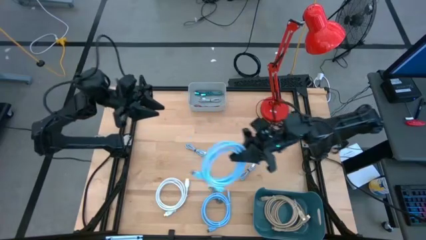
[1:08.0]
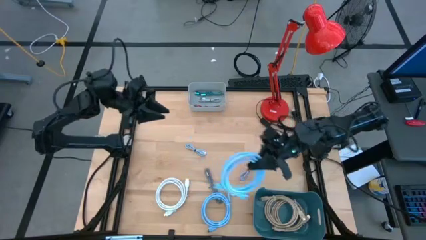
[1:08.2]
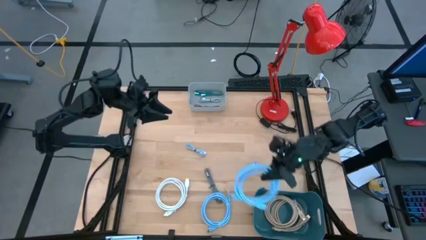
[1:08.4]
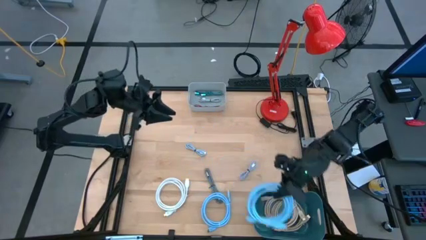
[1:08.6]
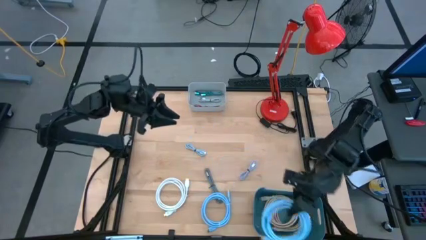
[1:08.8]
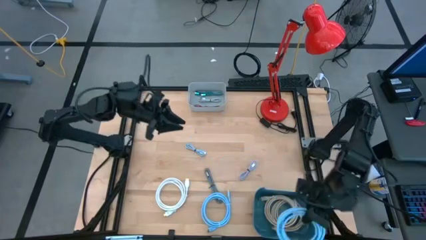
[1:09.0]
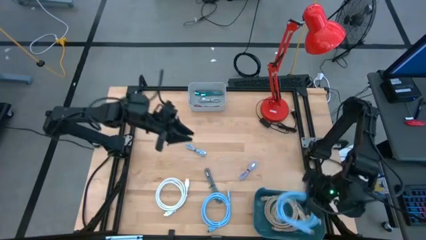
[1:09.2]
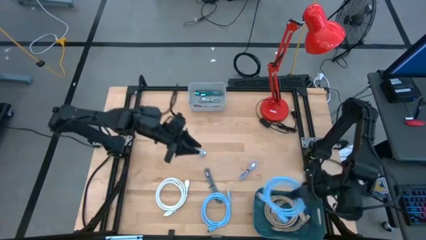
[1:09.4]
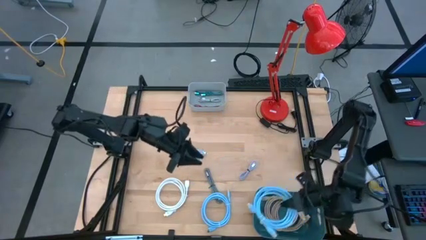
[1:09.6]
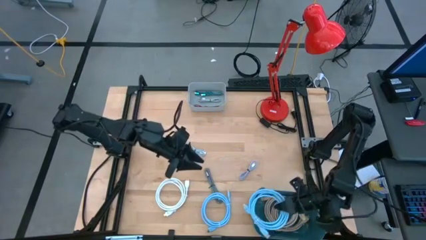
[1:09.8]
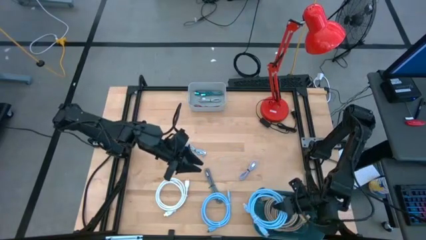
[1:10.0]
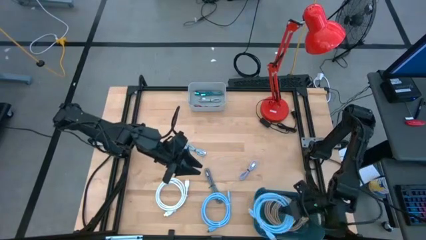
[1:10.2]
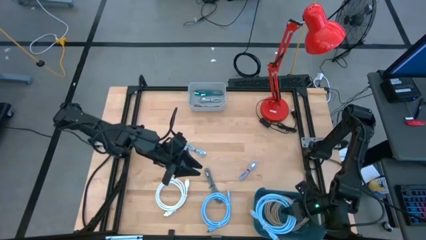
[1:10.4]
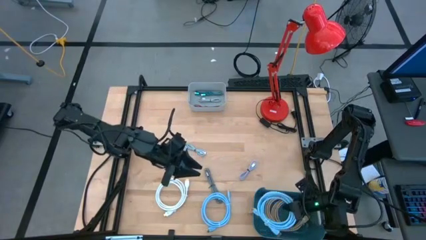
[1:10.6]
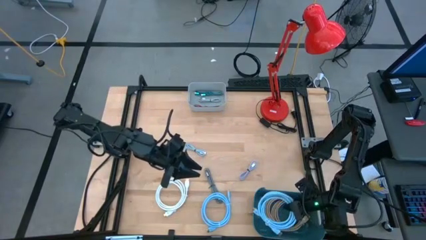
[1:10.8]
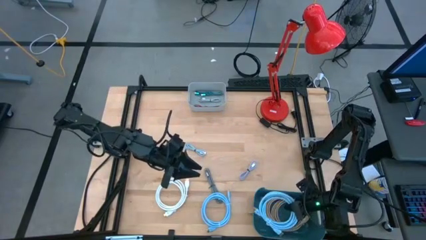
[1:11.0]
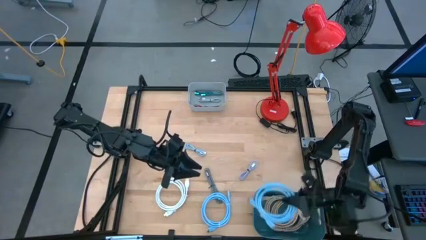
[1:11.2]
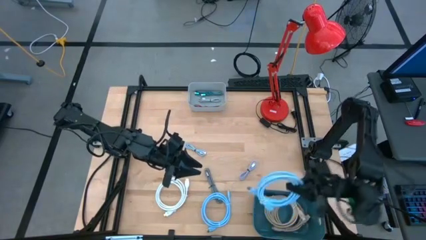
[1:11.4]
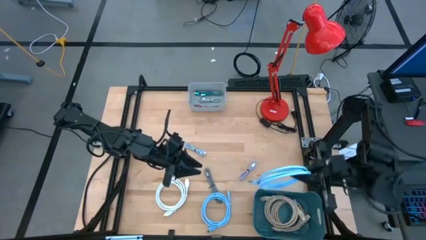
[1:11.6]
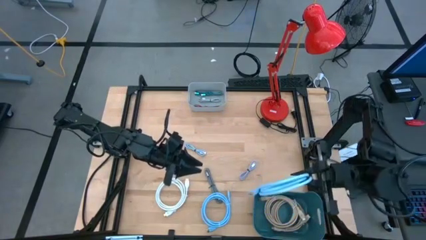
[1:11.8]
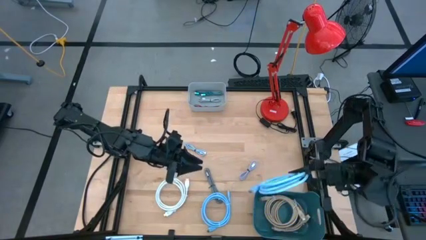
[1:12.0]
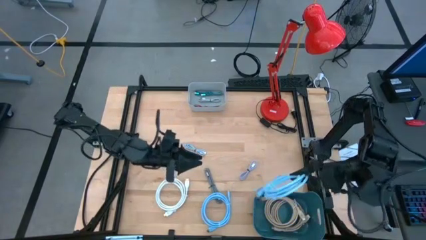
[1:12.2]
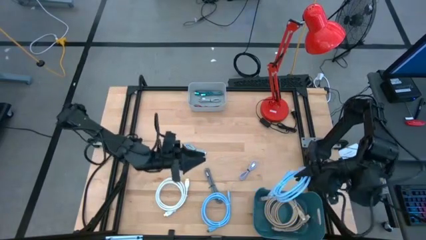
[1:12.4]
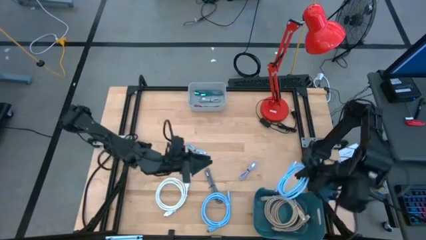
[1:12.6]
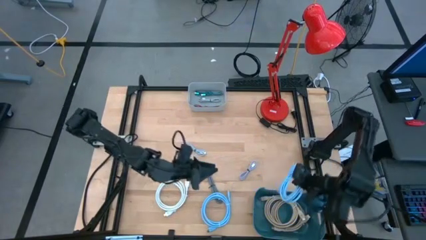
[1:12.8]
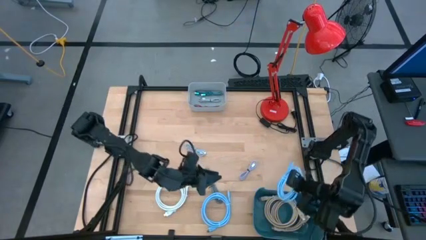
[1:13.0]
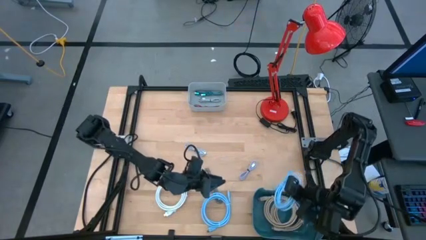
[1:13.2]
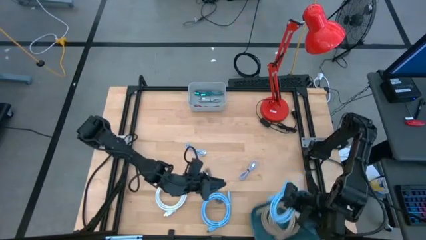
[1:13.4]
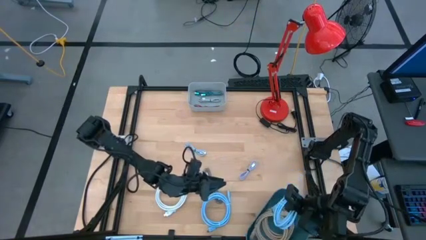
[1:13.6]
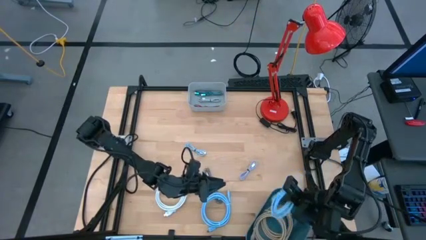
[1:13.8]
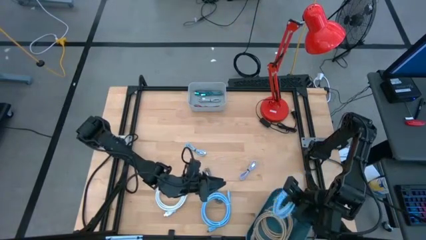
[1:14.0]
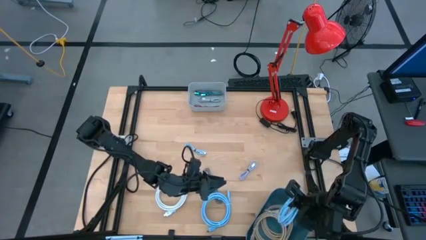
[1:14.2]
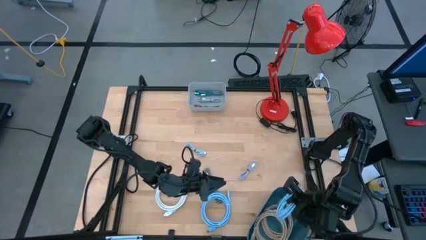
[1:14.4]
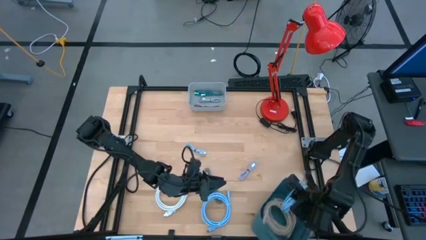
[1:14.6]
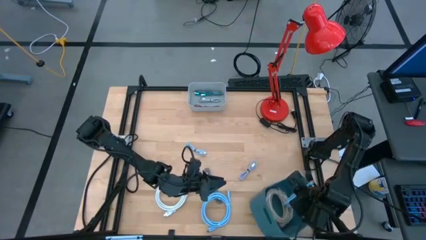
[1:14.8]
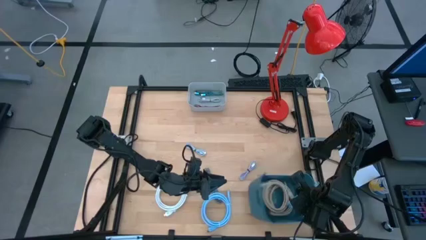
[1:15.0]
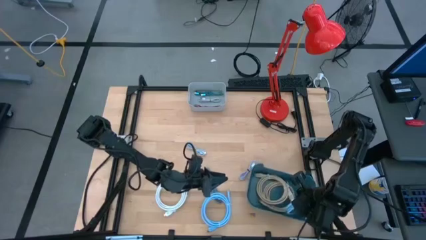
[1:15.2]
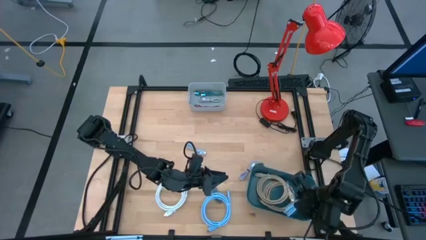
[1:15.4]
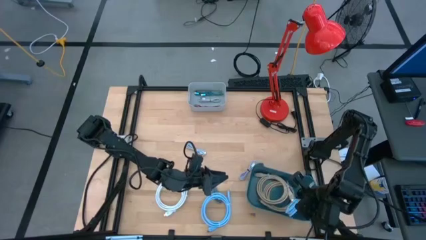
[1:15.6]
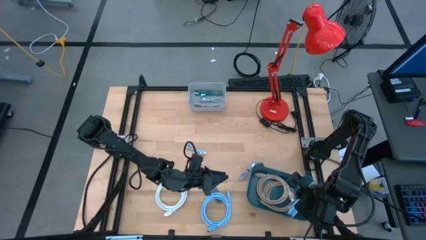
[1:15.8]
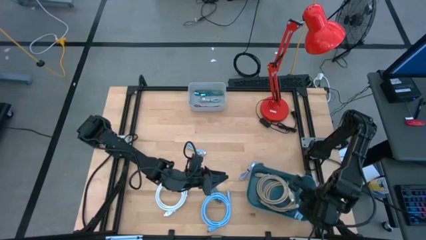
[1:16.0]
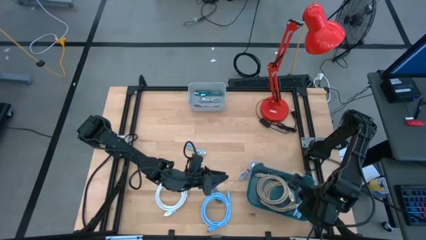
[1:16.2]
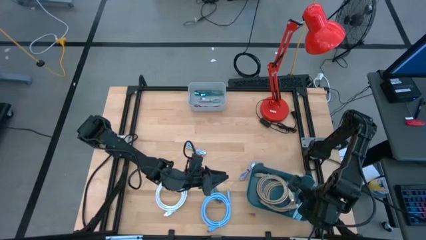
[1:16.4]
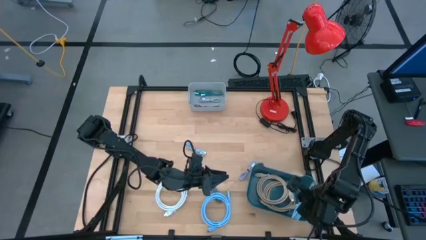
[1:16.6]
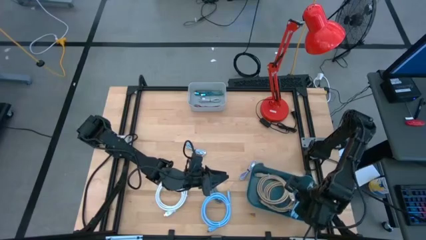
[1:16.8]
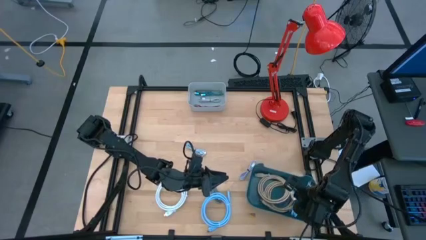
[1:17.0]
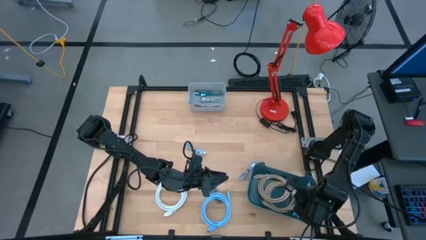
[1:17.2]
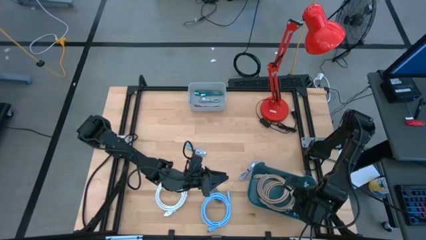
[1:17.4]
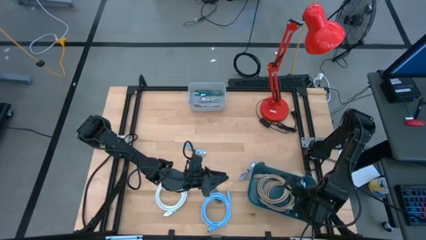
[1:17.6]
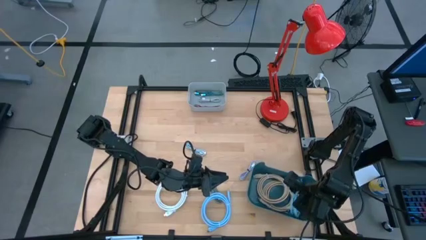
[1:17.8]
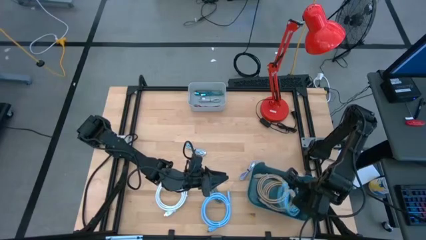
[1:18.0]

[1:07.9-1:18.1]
Task: Pick & Place USB Port
Put the blue hdmi cable into the blue bin

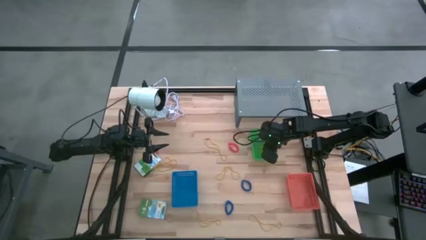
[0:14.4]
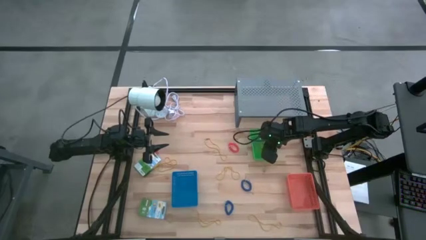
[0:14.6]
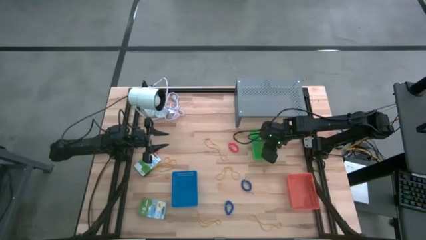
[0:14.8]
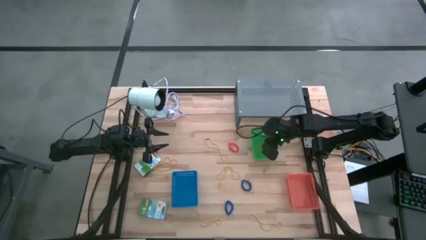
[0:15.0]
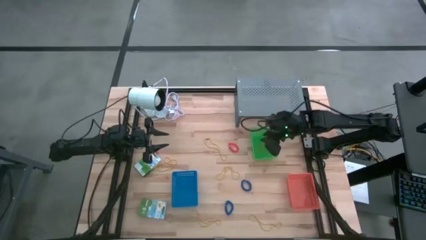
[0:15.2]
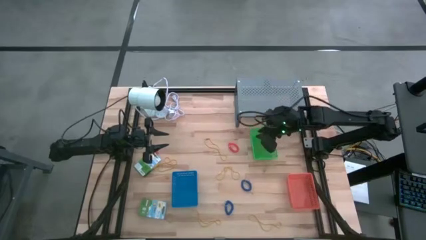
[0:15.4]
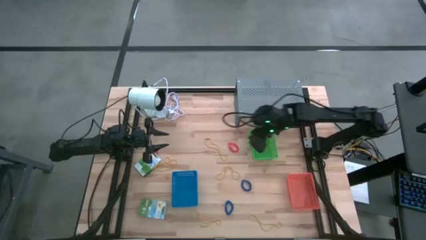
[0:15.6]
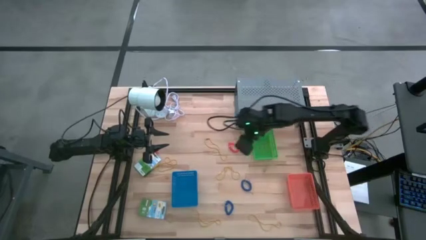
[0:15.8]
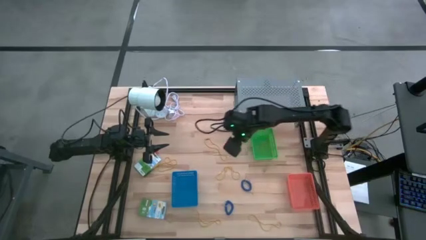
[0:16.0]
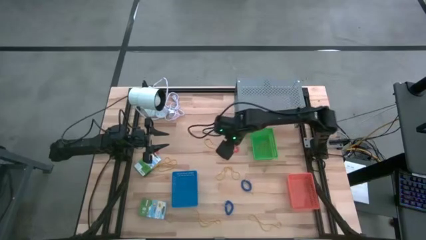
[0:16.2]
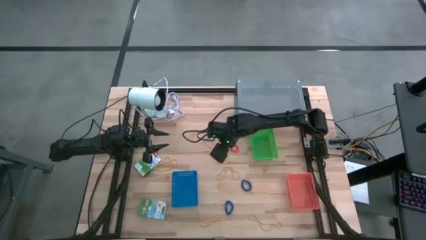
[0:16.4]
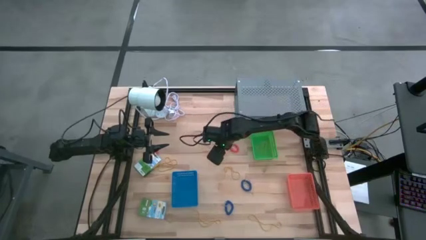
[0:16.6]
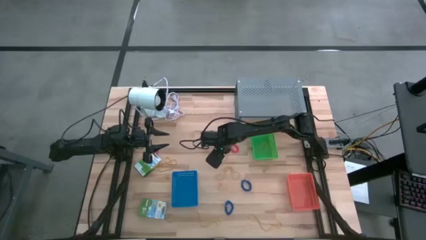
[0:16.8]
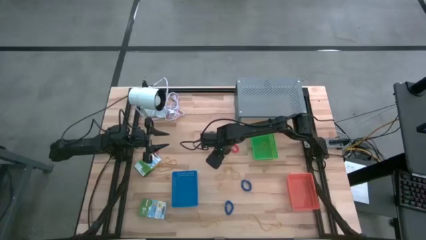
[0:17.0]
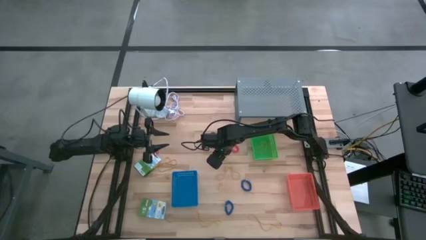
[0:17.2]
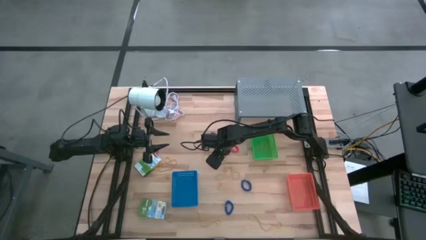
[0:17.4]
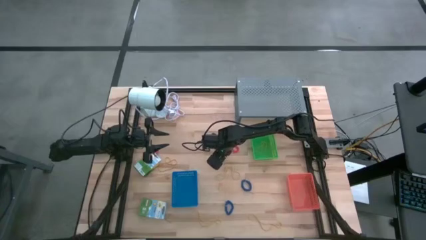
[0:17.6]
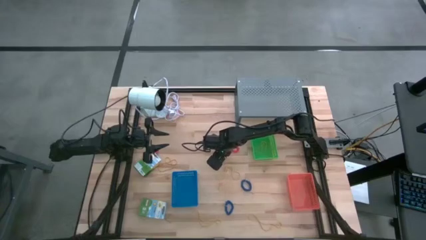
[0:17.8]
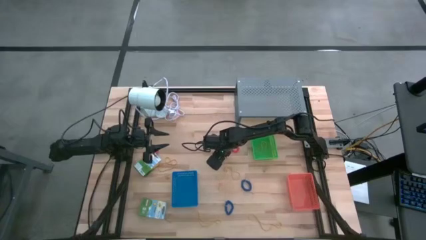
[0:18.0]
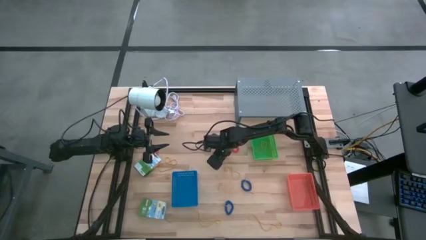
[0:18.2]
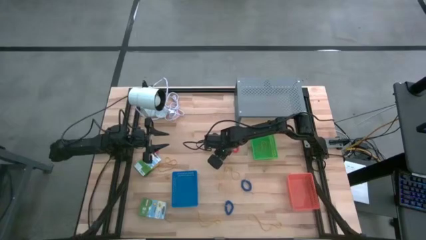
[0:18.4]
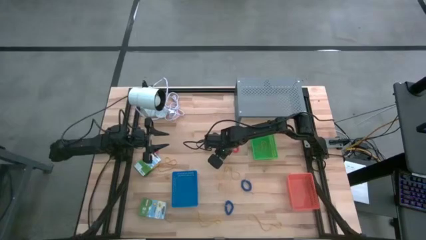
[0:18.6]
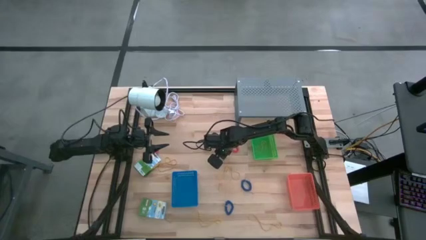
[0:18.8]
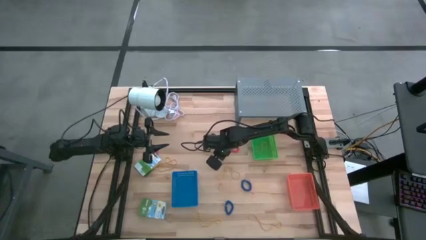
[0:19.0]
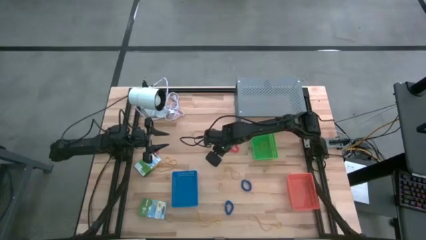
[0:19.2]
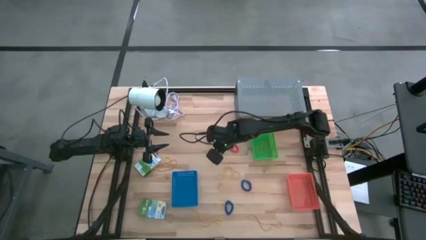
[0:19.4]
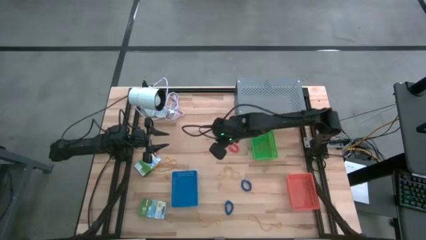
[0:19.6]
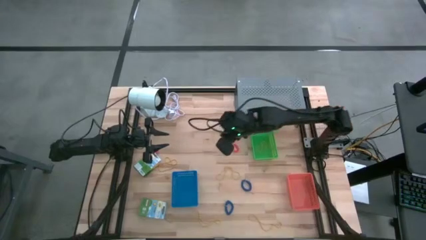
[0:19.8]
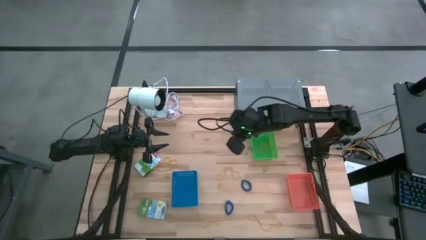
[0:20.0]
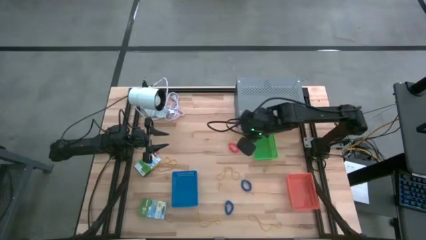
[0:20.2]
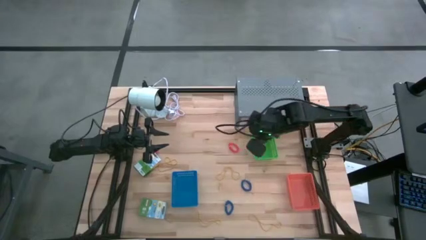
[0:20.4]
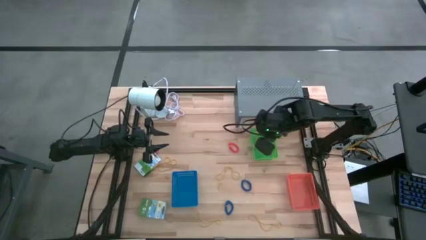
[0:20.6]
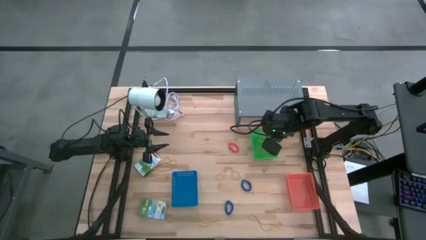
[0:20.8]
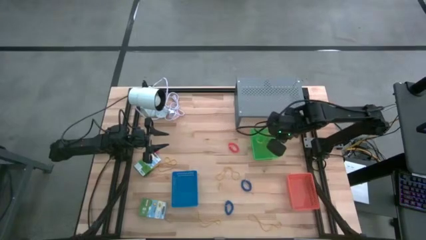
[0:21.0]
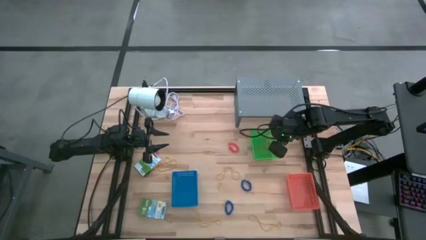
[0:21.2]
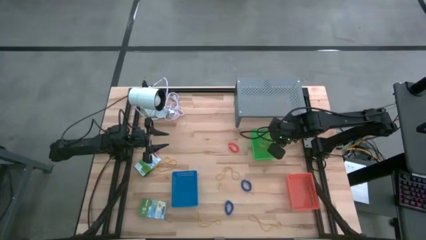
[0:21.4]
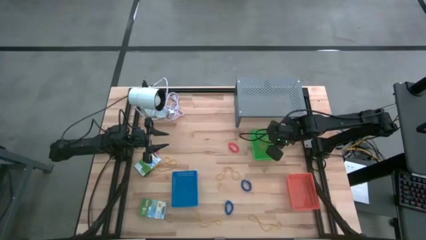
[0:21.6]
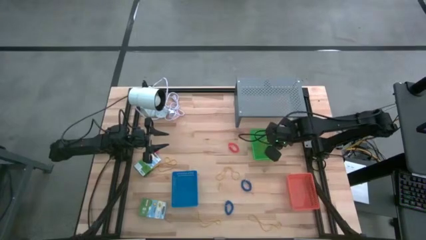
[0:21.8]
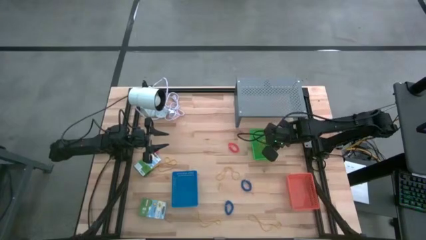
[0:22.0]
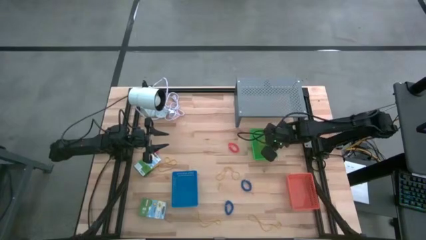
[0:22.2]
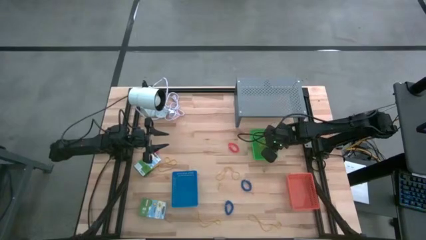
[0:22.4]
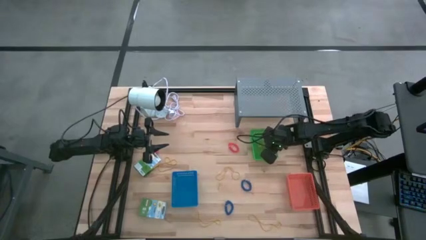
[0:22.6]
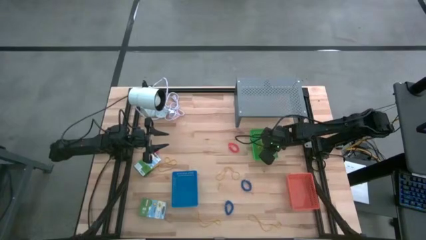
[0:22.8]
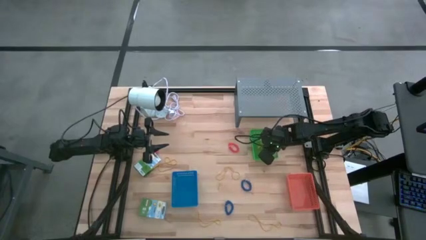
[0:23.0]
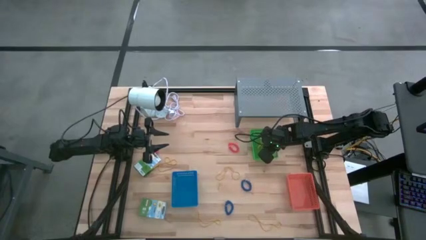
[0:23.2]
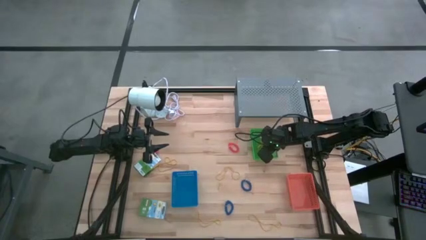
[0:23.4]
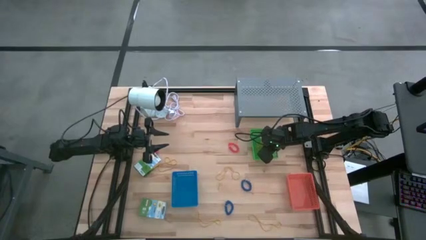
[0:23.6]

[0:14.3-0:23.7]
Task: Pick & Place Office Desk Supplies
Put the yellow rubber band into the green bin
